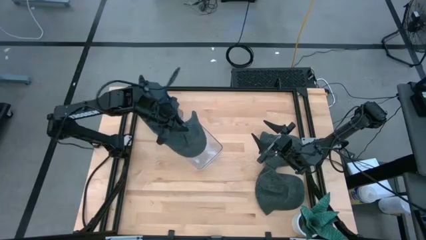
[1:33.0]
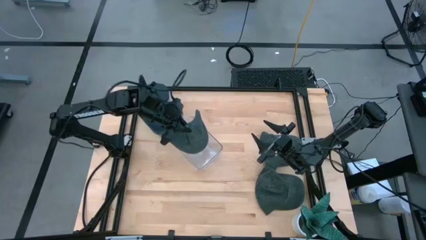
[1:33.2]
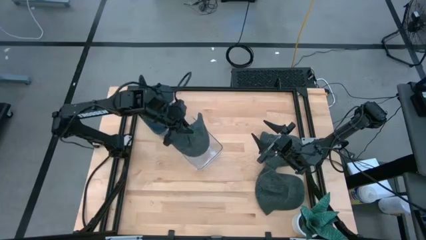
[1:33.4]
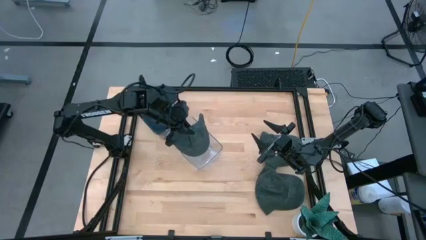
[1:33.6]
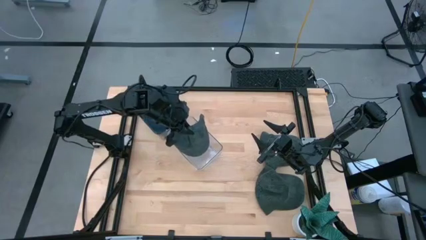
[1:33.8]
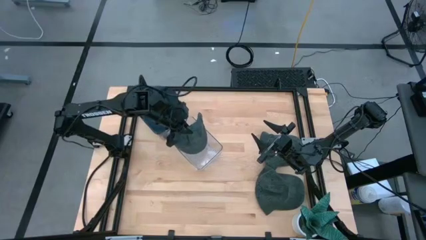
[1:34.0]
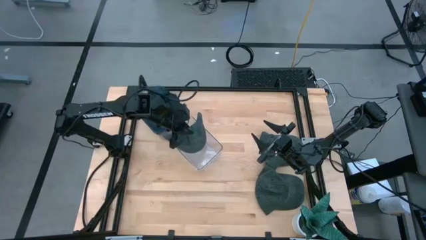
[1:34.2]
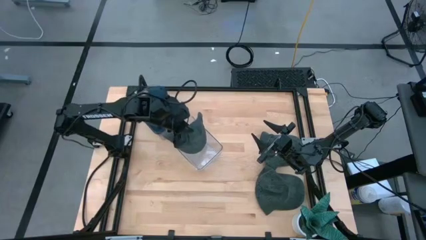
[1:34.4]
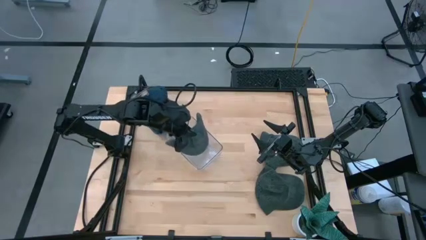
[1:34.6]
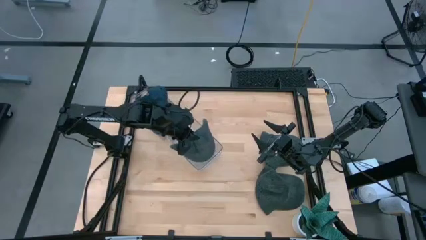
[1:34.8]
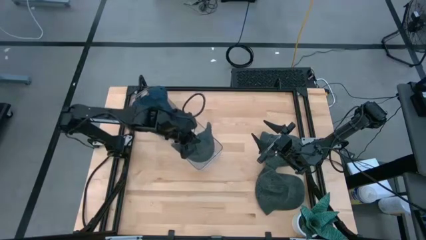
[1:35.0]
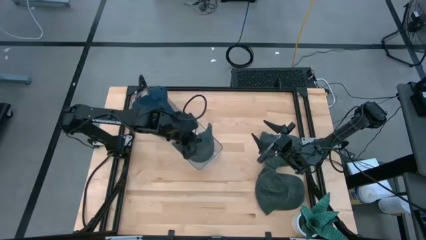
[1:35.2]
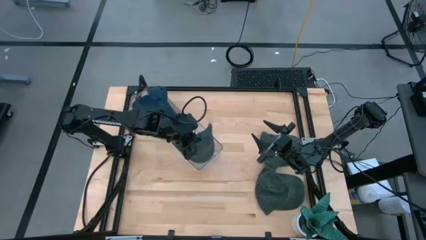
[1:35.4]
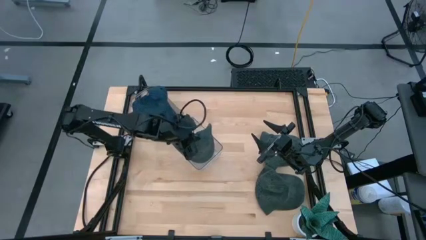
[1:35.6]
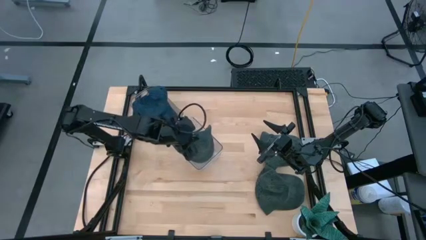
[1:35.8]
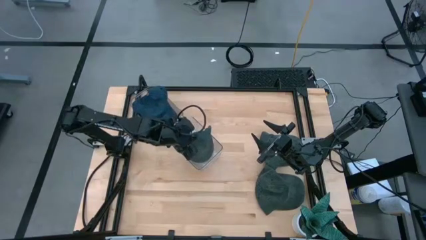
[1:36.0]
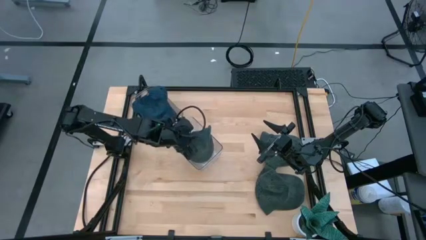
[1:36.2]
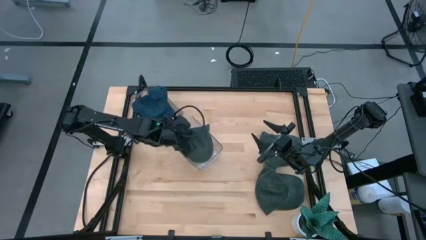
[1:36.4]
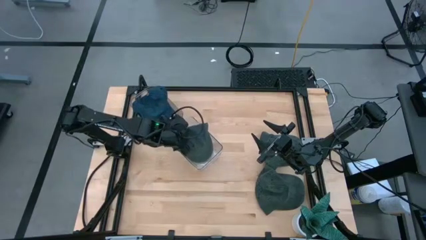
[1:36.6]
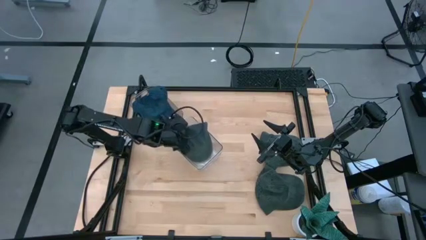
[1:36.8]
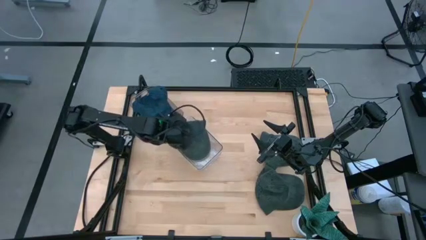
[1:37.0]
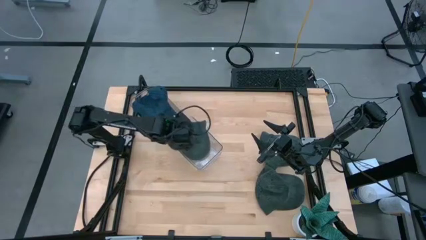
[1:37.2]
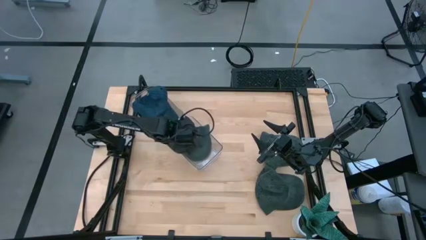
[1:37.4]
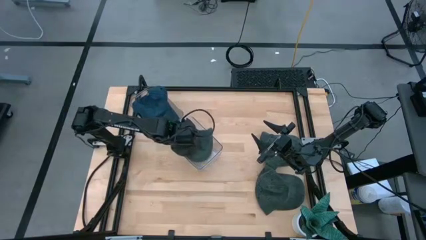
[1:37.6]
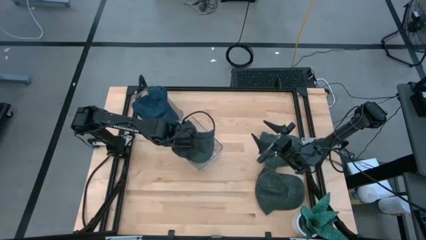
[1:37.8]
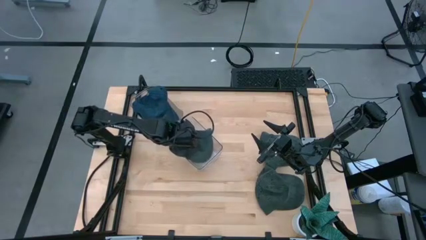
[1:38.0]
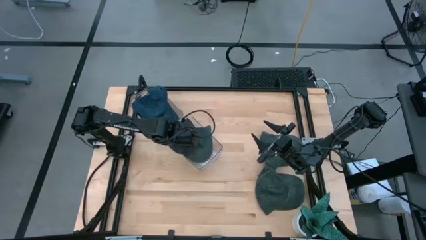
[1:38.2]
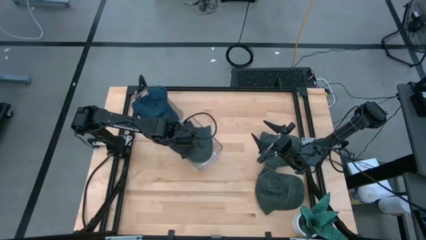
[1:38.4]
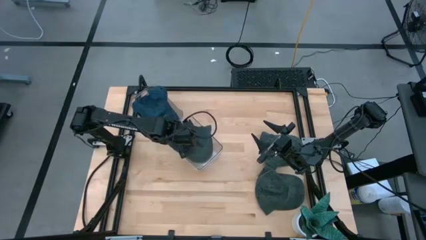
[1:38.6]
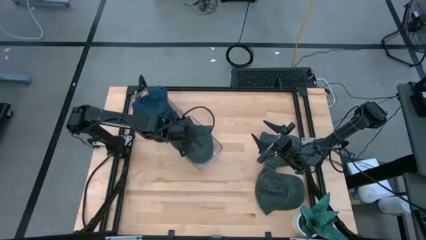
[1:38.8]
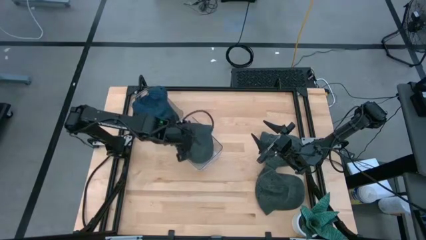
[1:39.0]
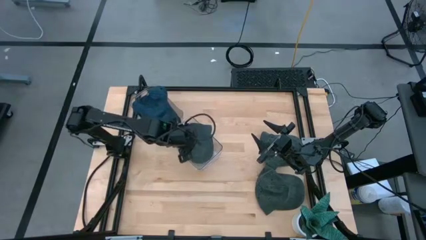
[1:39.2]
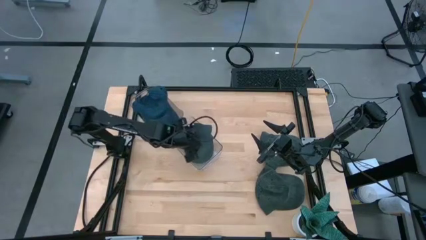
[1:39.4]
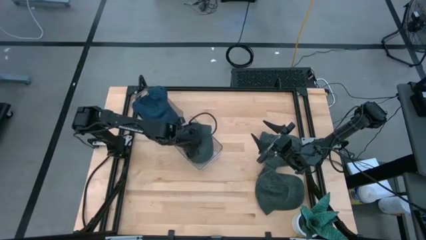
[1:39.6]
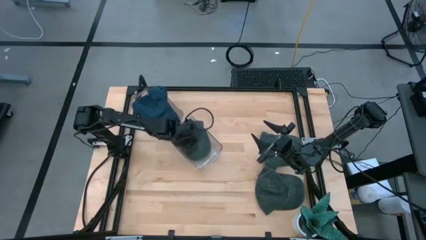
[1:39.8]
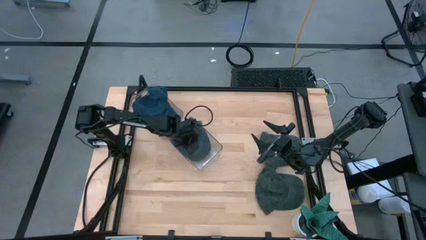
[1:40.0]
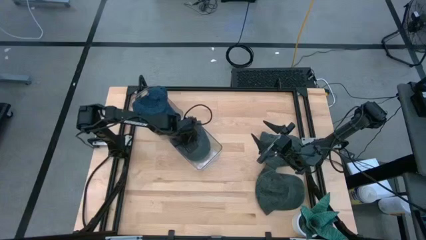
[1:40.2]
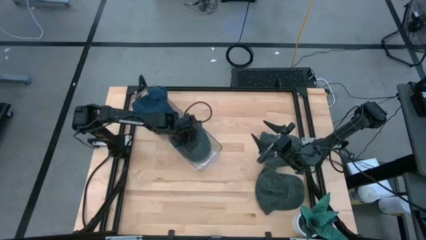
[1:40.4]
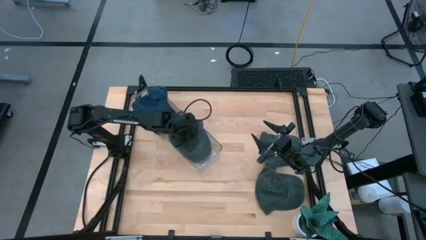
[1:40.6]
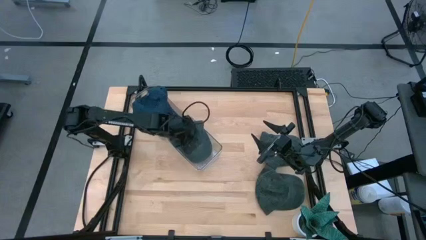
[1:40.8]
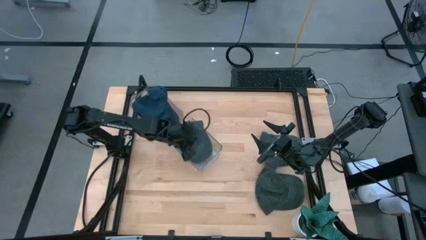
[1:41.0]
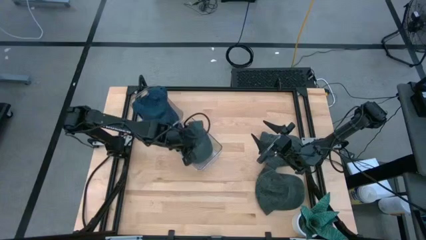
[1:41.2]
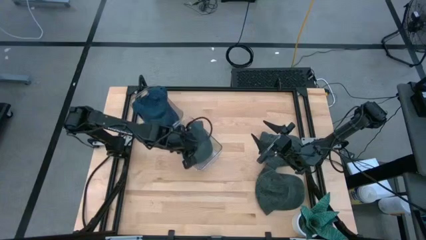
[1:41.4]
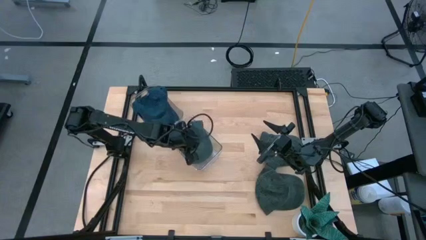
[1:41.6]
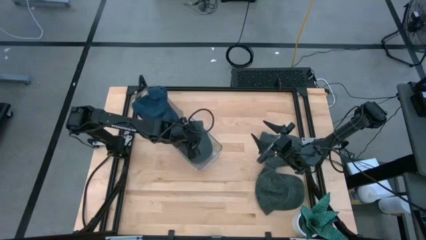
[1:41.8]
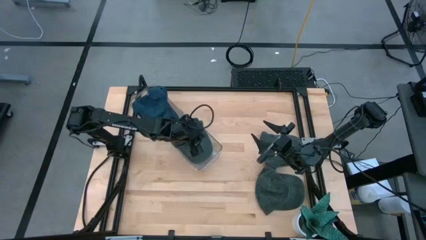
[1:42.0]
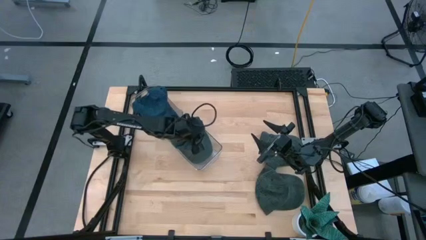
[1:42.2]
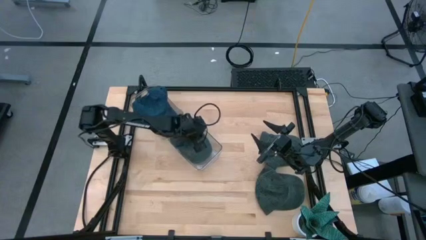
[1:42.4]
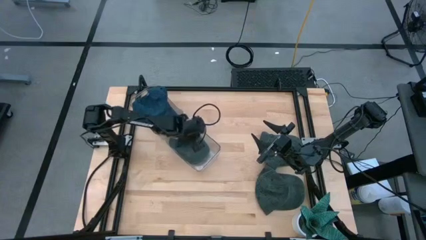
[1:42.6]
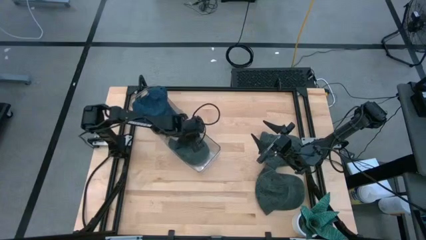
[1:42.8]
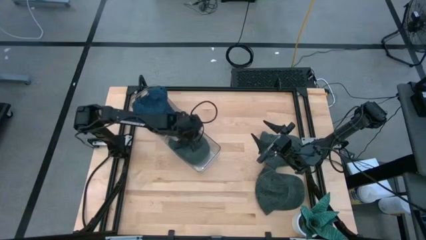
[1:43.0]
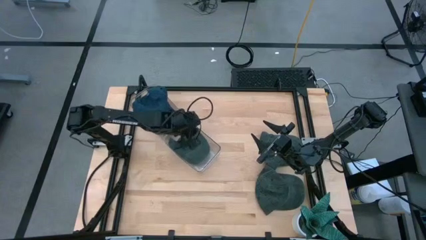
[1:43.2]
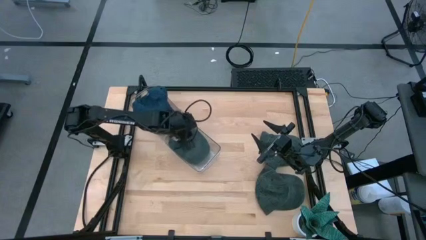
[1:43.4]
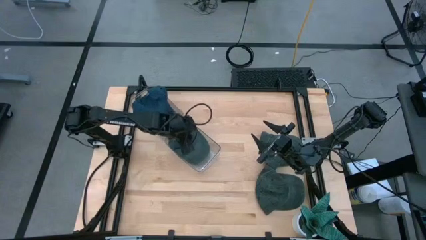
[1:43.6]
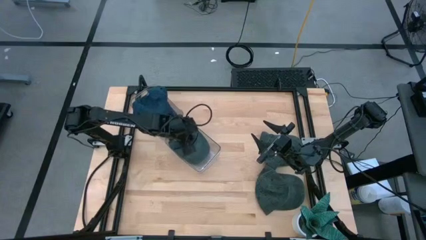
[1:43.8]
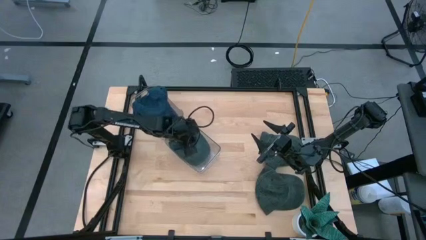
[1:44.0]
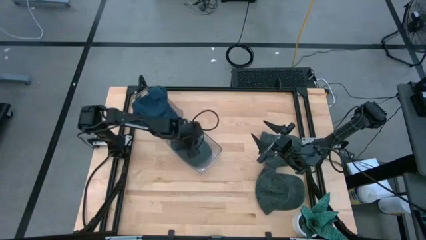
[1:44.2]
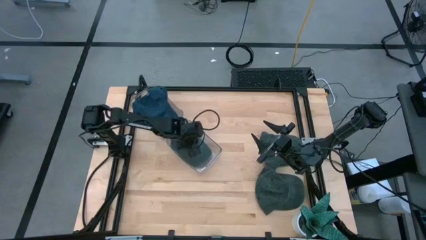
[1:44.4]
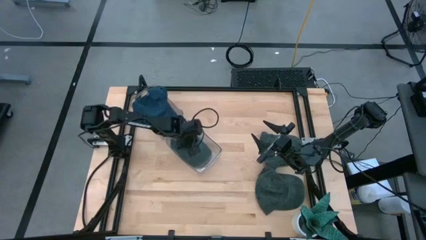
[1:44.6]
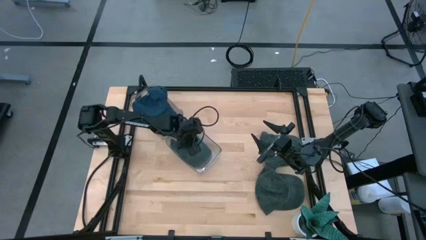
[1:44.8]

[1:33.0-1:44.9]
Task: Pick & Place hat
Put the top black cap into the bottom transparent bin

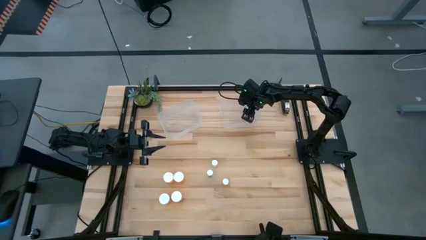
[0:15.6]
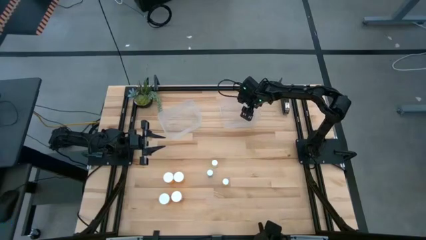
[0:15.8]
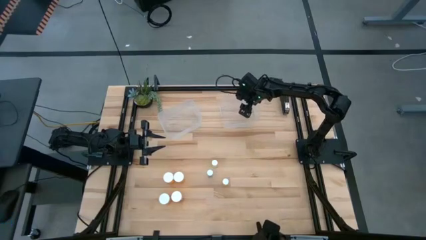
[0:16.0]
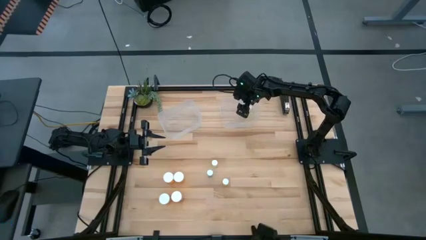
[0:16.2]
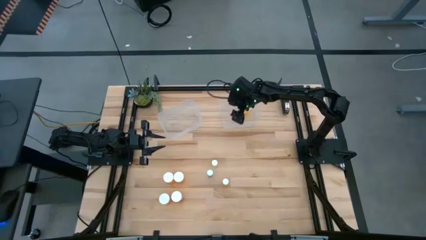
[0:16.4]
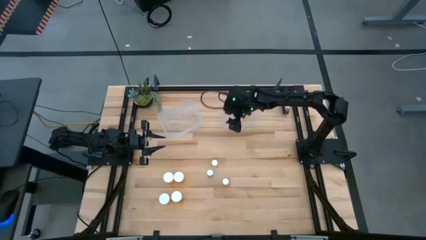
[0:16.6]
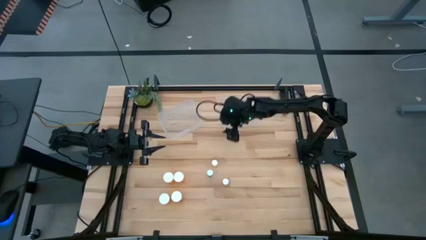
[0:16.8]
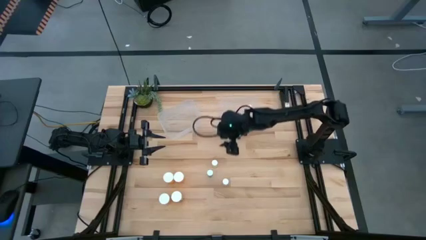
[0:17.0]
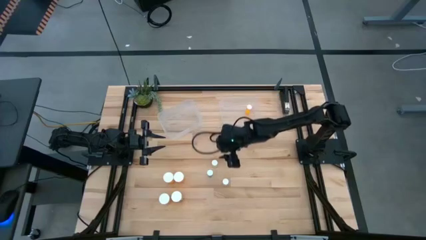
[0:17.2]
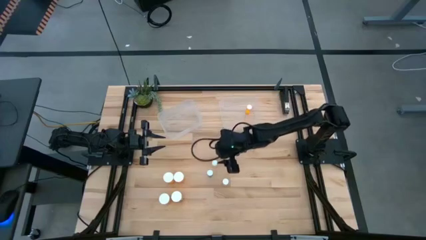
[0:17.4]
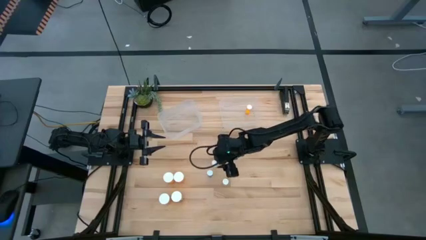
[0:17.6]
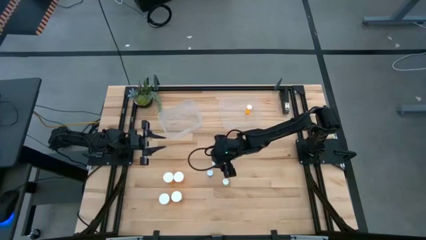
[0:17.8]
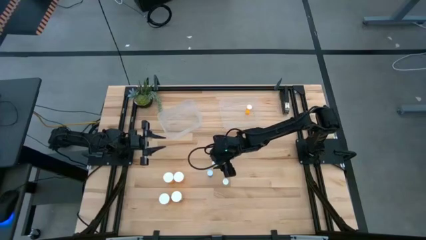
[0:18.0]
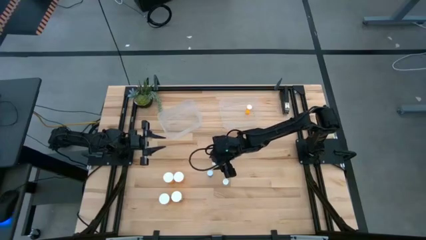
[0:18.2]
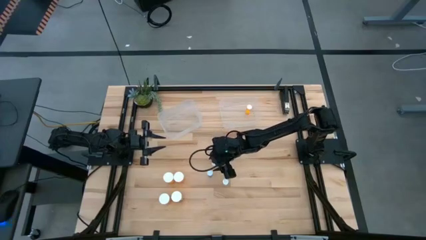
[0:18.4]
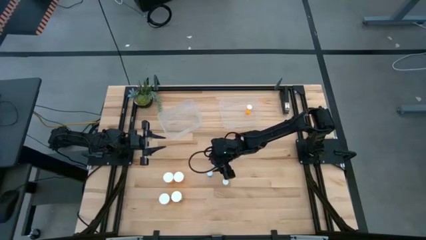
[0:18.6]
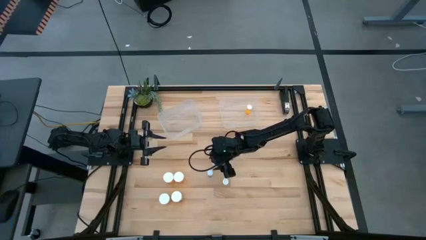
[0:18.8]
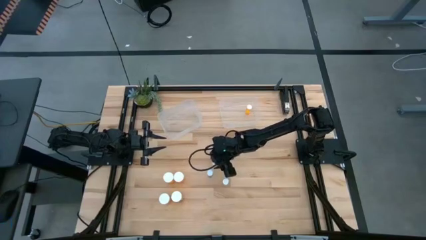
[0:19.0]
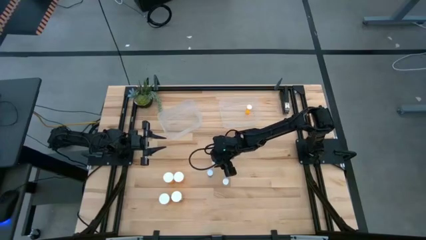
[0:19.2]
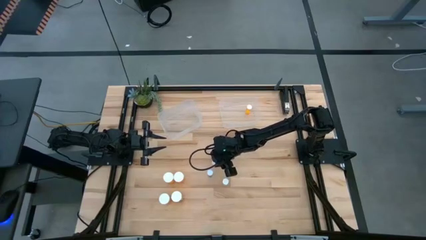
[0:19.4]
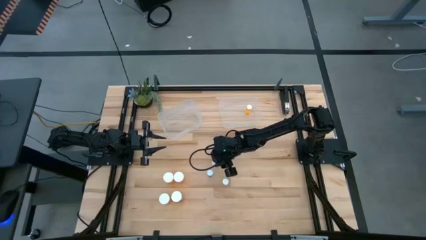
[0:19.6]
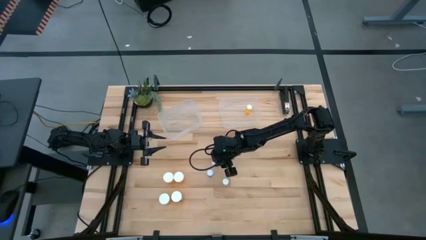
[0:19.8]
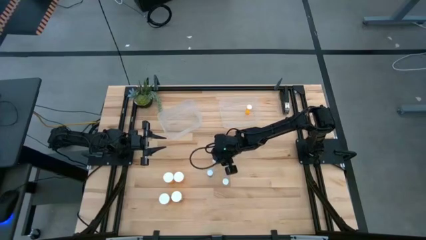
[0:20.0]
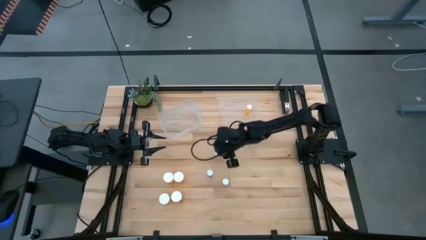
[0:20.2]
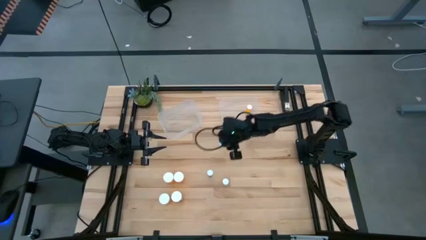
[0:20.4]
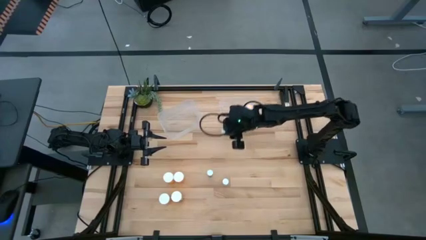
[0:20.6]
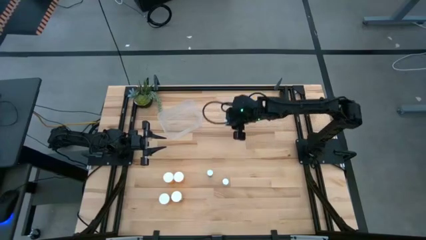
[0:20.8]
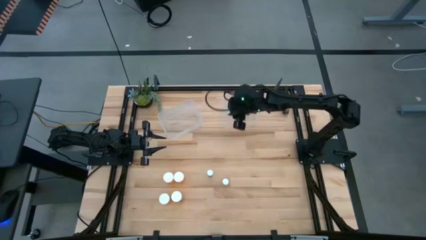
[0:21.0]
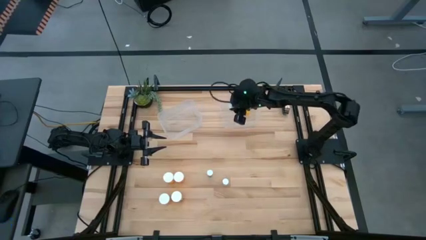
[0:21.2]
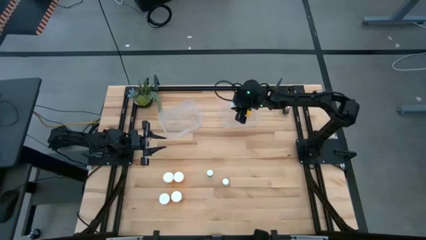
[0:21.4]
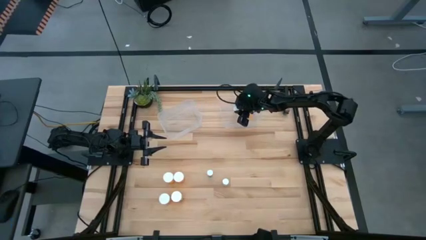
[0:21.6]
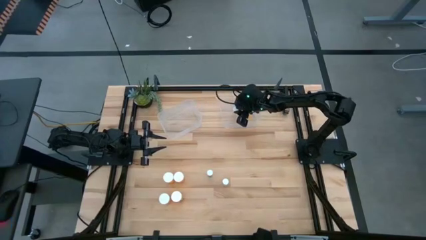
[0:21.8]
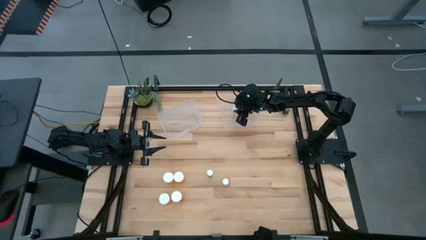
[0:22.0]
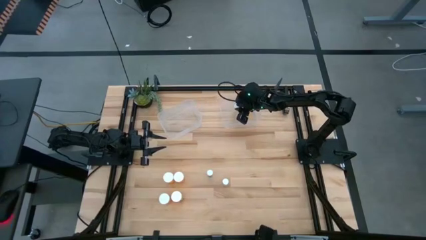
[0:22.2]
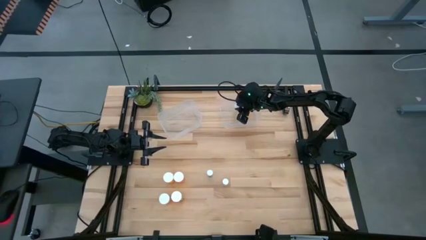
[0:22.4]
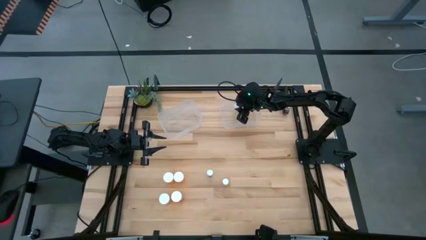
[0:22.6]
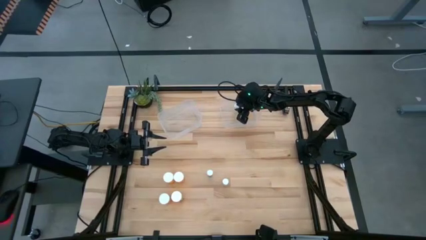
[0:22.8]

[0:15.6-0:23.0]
Task: Pick and place medicine bottles into bin by pill shape (circle, oval)
Put the top yellow pill bottle into the right transparent bin
